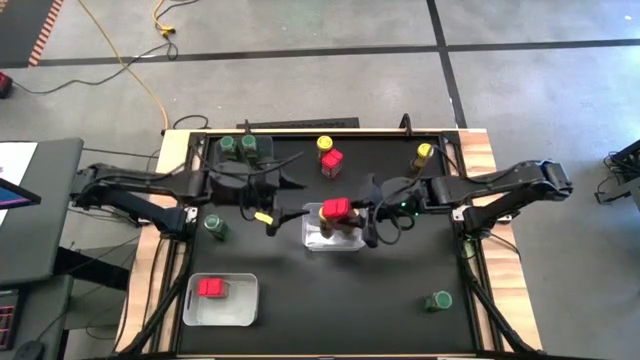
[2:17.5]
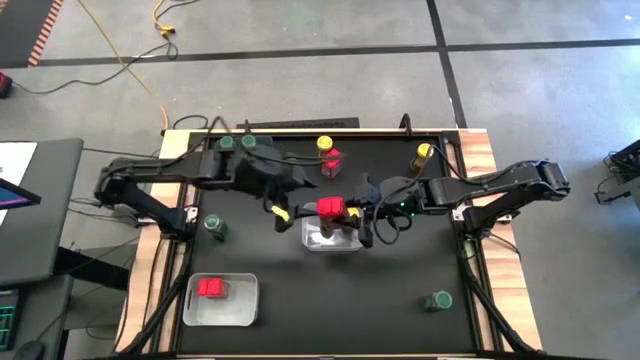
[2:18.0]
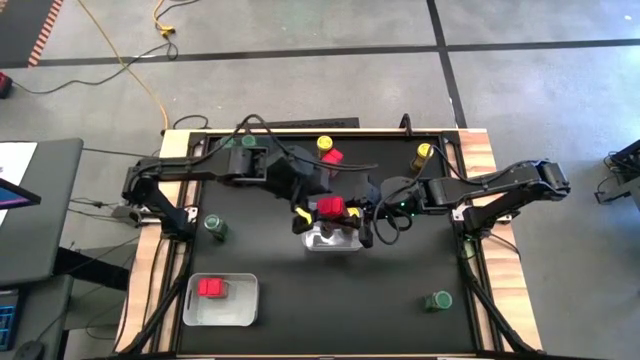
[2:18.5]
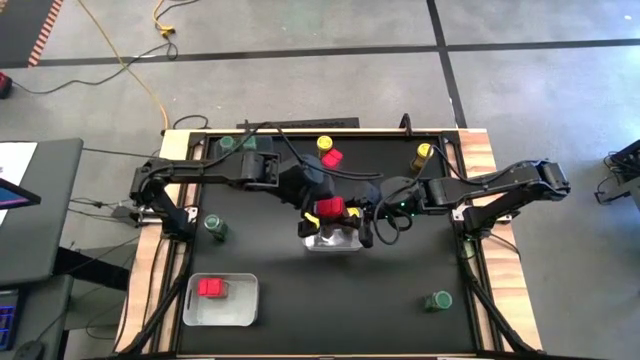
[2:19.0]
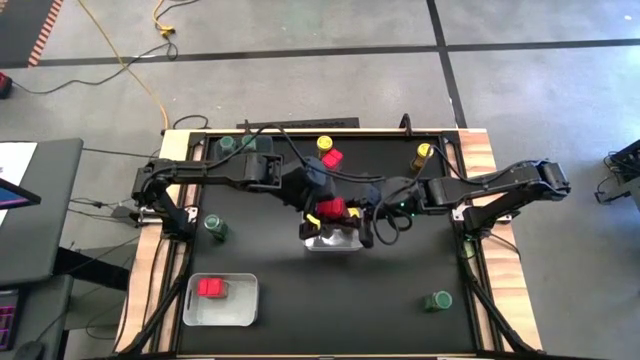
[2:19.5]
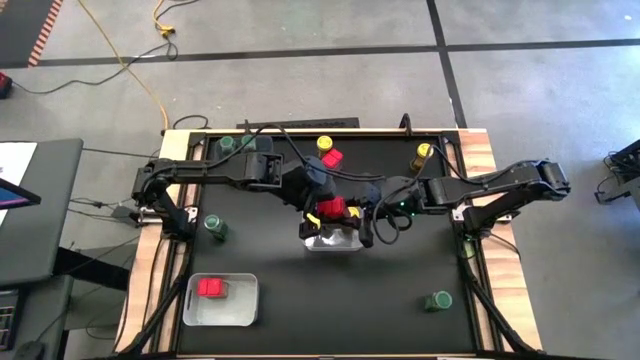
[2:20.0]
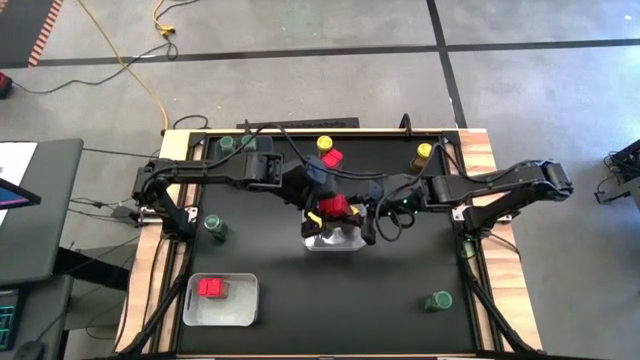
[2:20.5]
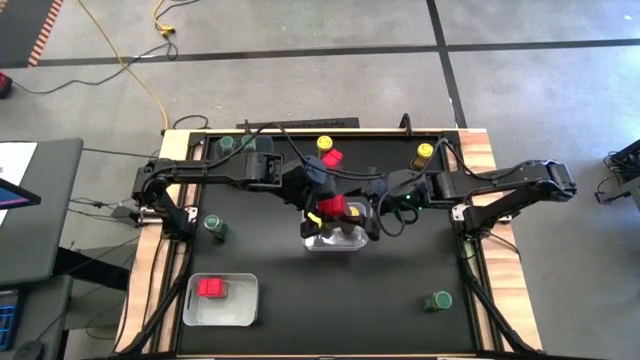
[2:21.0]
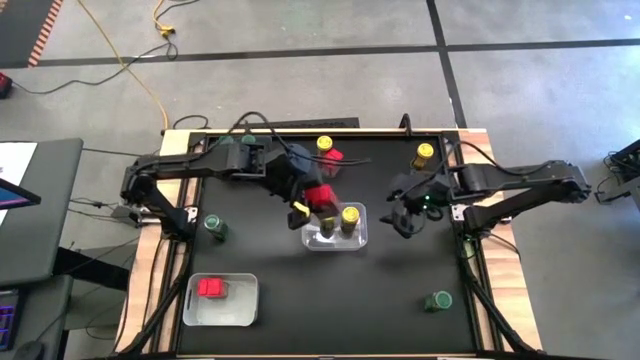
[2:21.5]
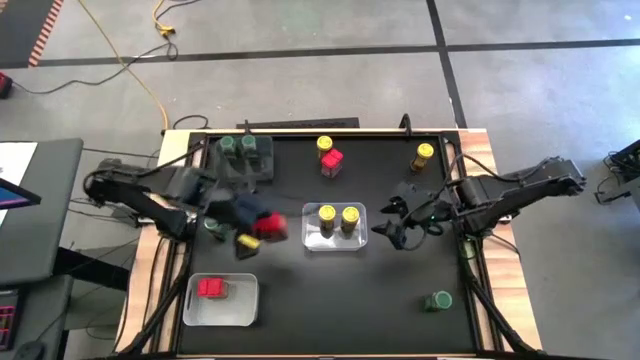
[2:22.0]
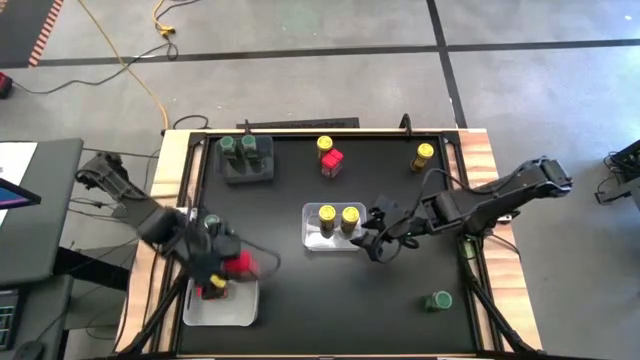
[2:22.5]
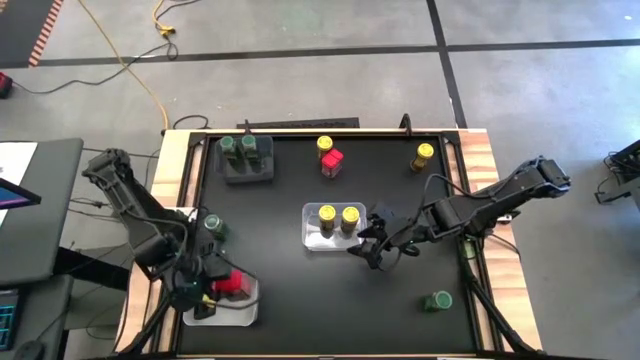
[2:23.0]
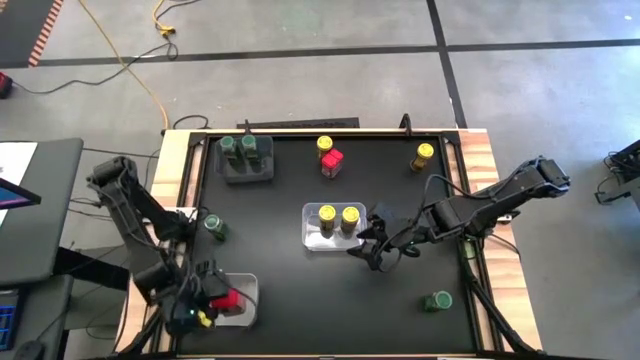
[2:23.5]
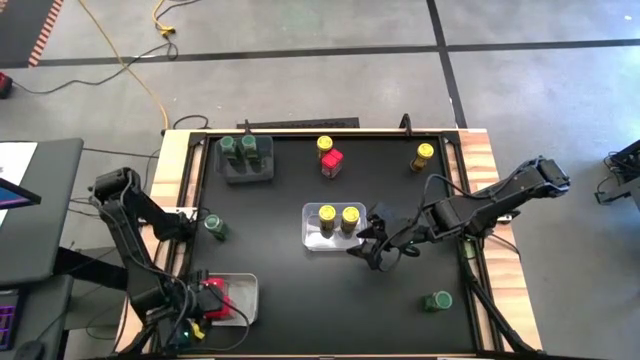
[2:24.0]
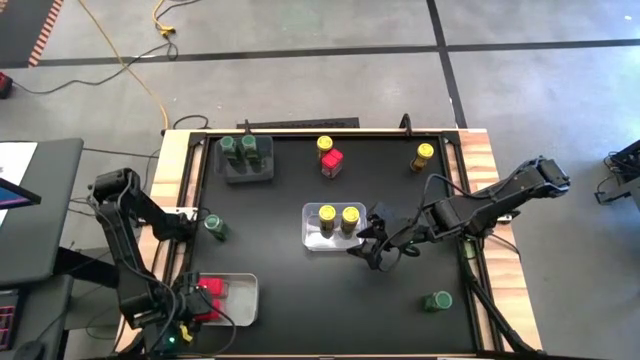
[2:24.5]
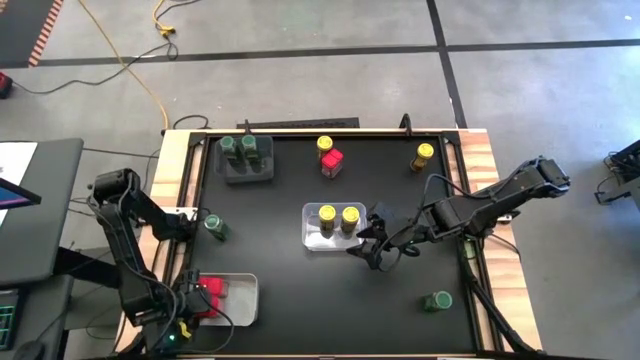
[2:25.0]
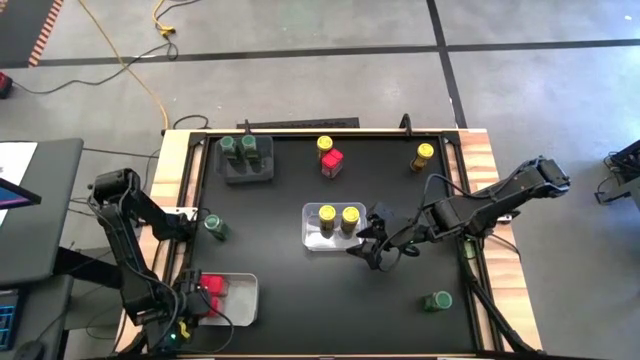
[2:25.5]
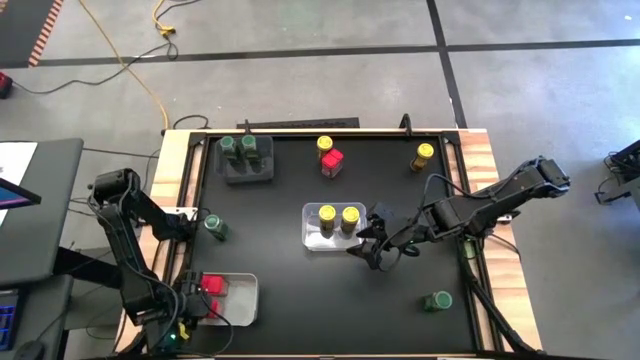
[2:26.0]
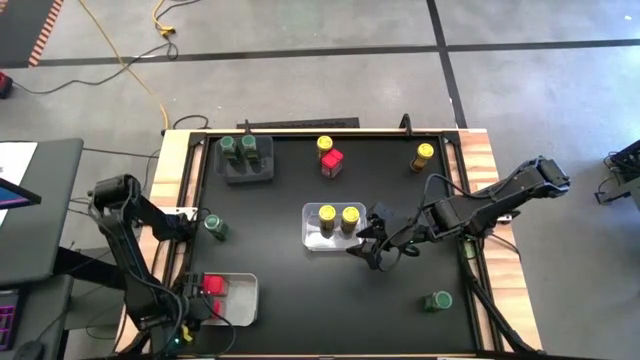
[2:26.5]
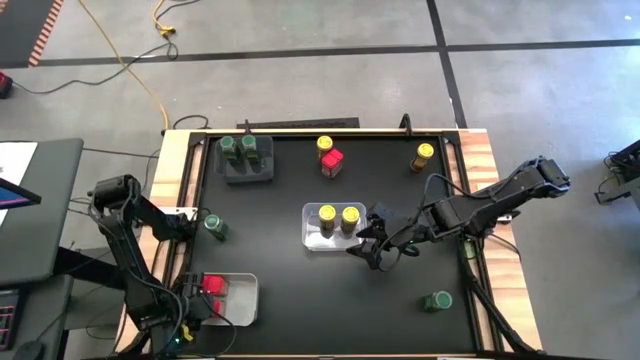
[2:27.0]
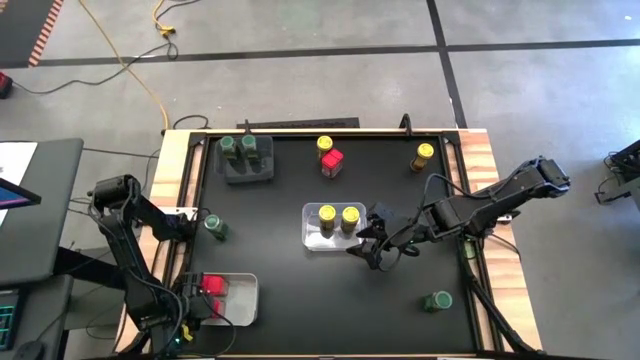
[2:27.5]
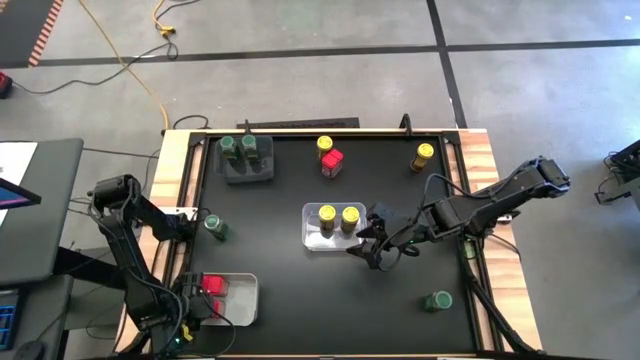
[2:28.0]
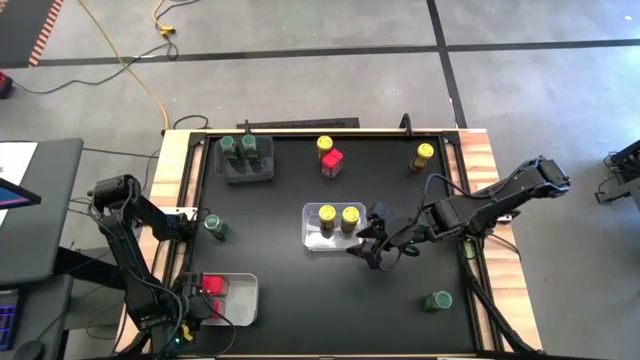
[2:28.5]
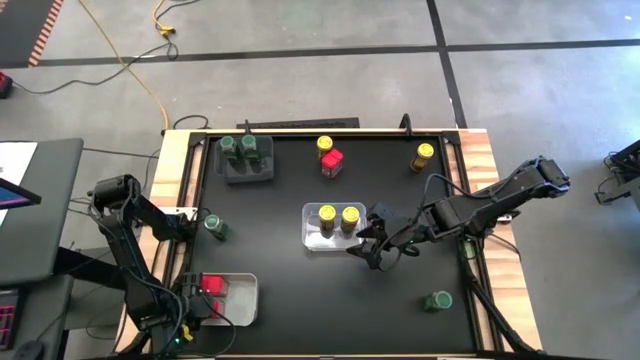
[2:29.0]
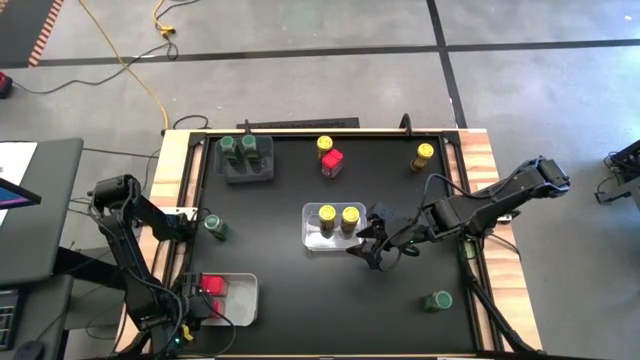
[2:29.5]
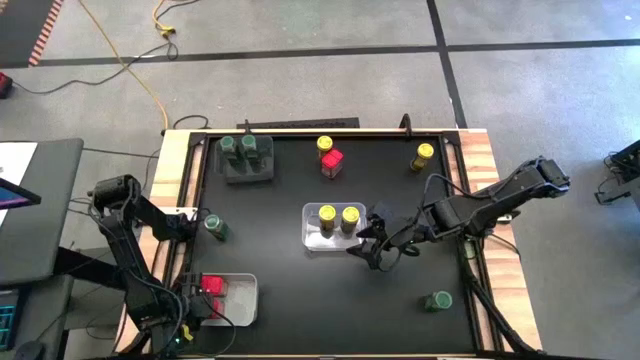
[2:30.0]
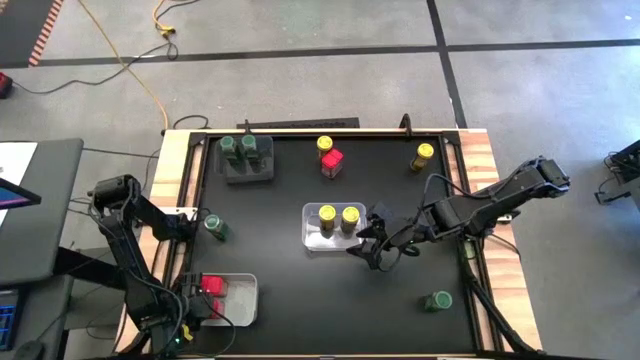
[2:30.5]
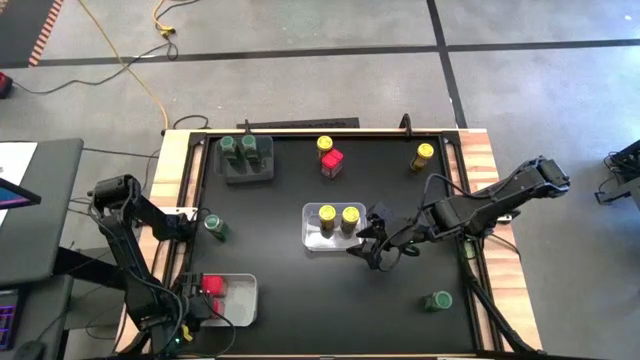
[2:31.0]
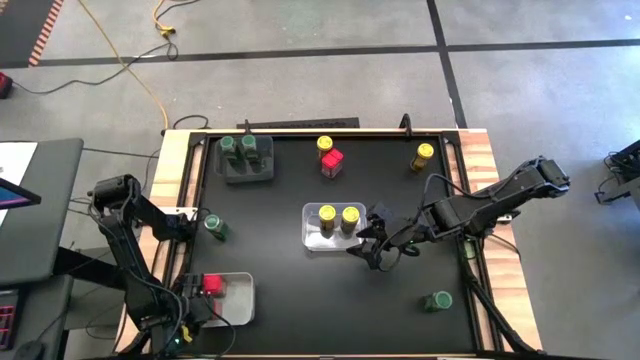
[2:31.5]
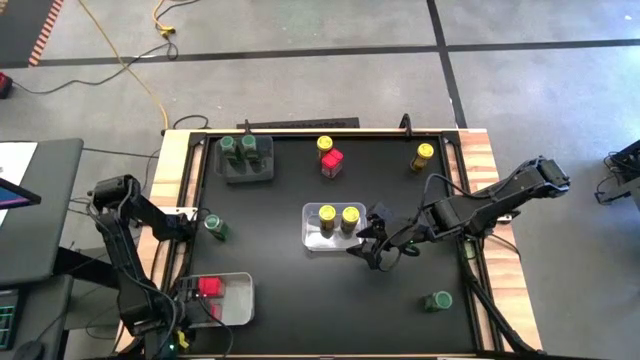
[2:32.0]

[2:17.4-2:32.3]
Task: Sort spices by type
Put the red seasoning can into the gray bin

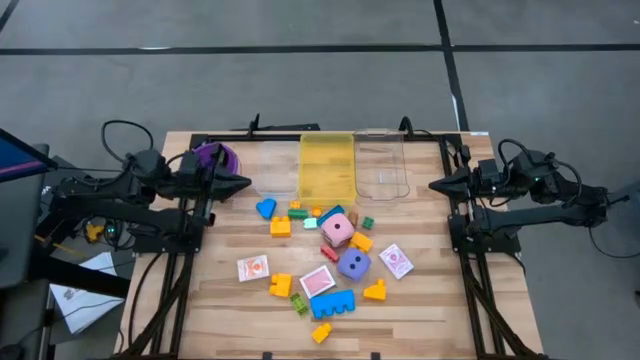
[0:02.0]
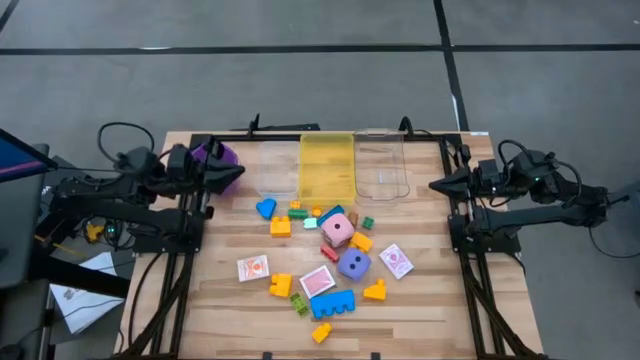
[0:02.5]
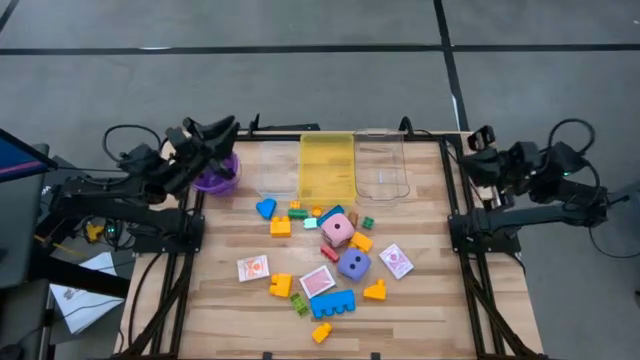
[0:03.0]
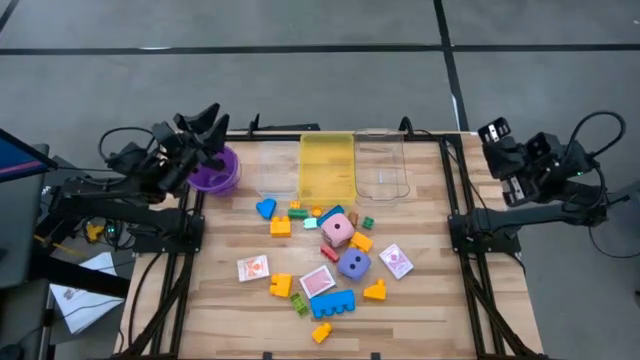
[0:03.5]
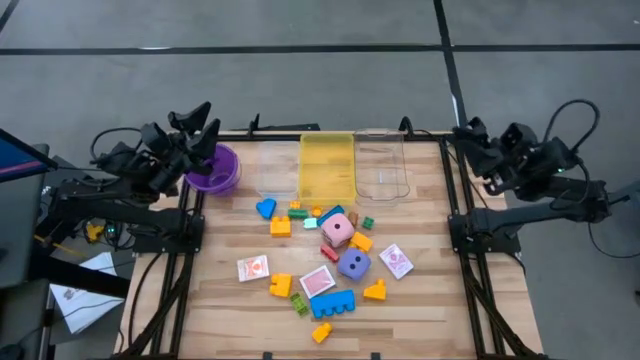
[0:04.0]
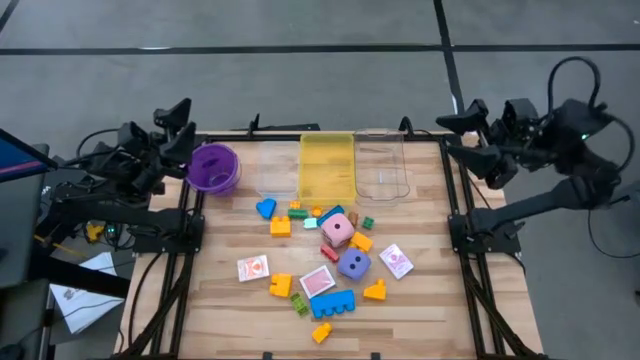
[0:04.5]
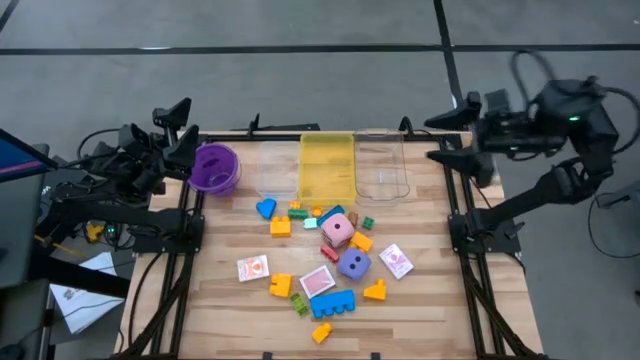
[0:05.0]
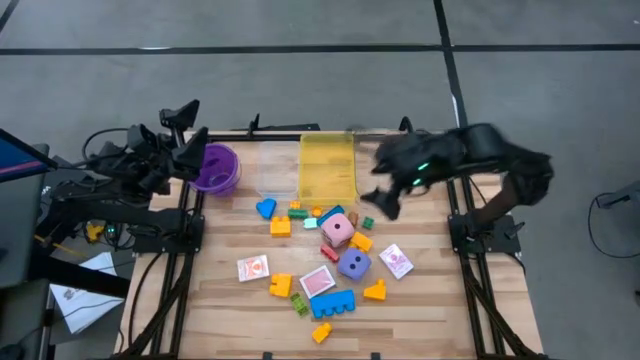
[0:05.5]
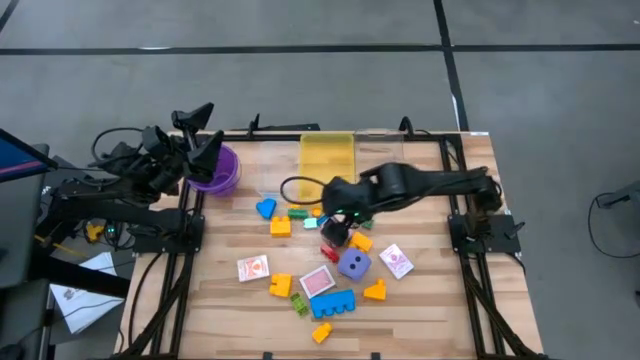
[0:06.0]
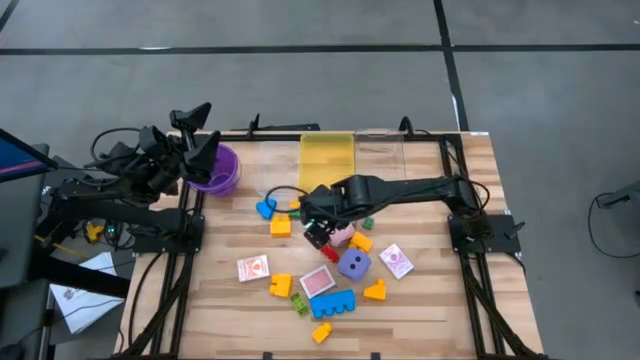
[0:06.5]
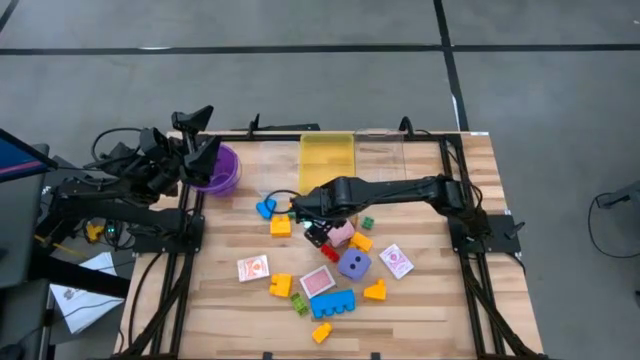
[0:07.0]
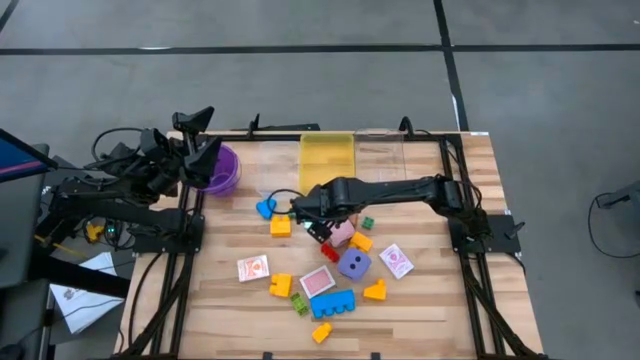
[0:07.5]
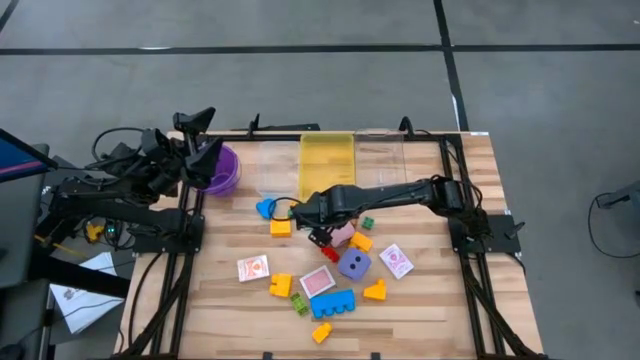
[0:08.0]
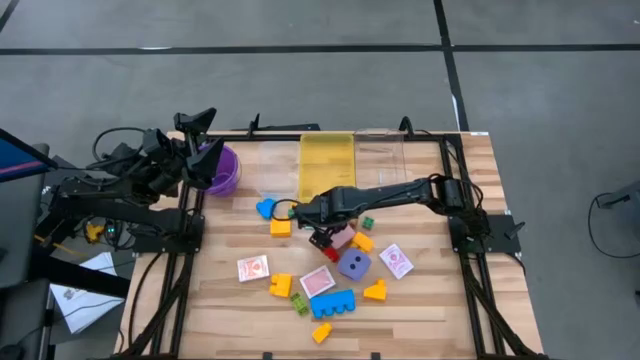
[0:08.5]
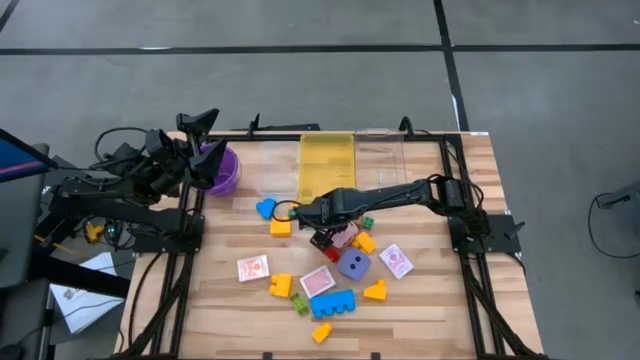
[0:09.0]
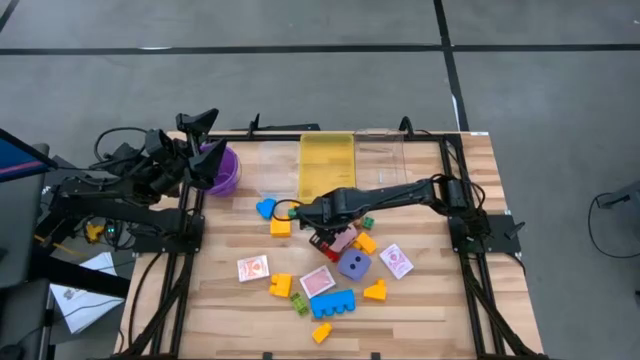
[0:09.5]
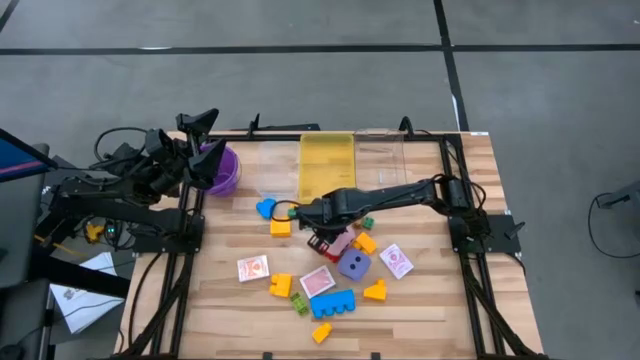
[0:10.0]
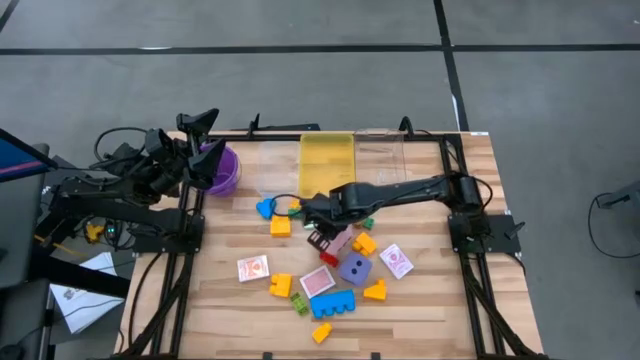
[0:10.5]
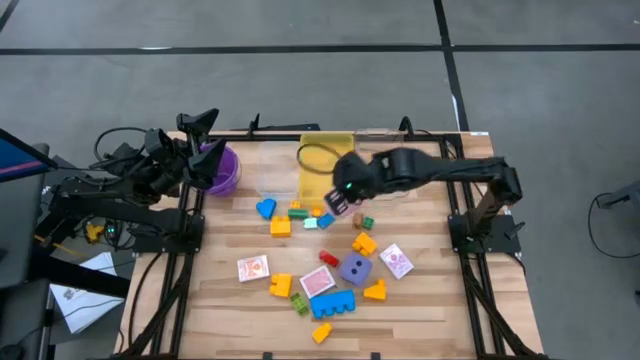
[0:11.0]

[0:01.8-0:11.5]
Task: Pick & Place Toys
Put the pink dice into the transparent bin
